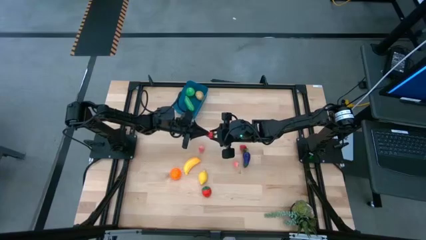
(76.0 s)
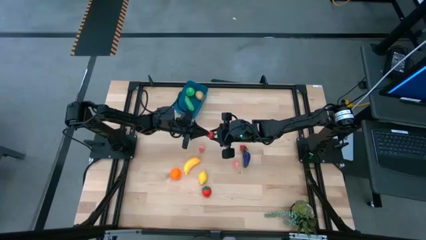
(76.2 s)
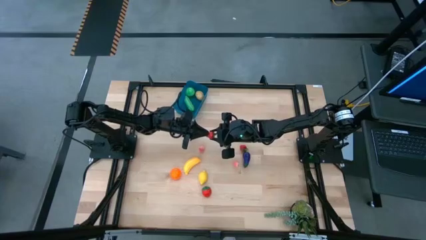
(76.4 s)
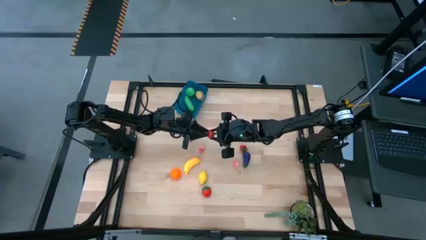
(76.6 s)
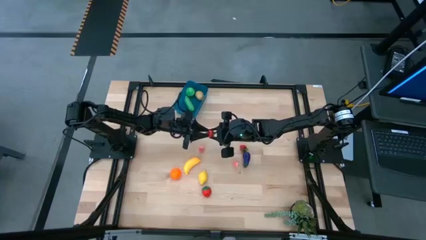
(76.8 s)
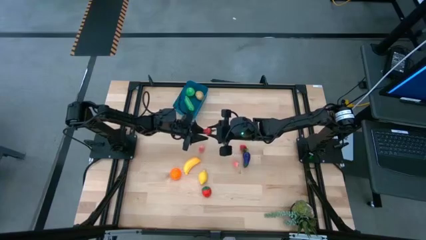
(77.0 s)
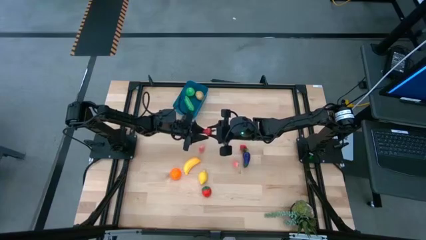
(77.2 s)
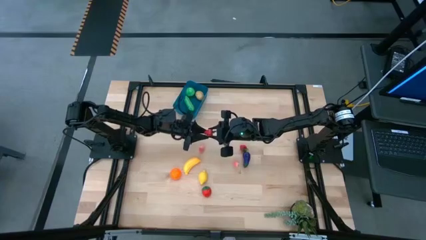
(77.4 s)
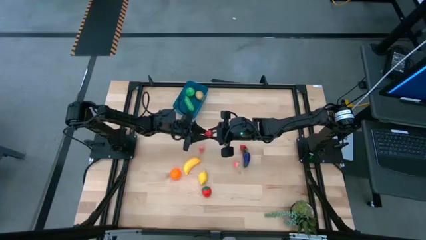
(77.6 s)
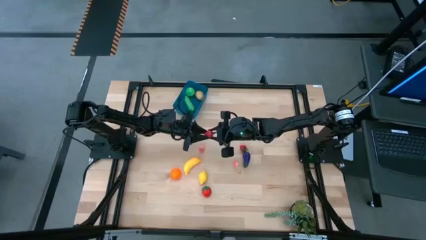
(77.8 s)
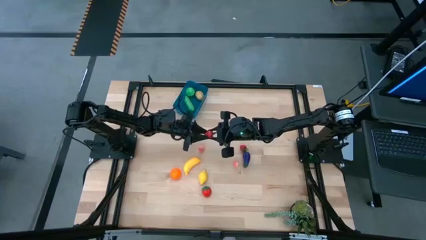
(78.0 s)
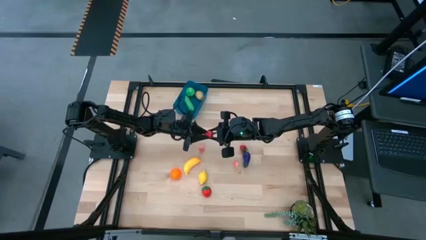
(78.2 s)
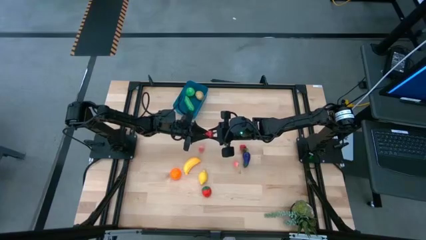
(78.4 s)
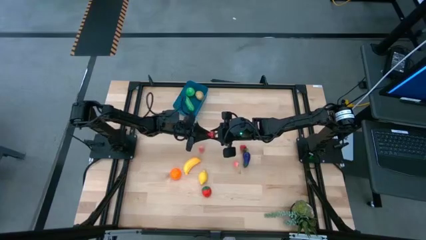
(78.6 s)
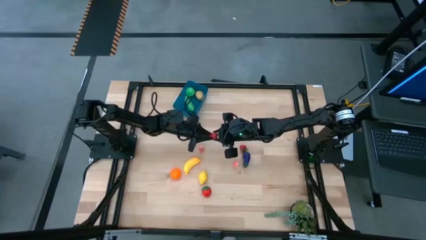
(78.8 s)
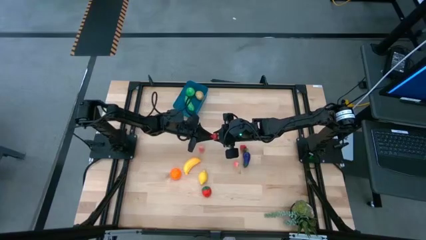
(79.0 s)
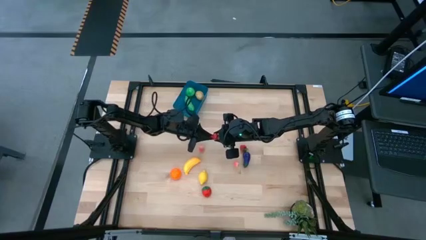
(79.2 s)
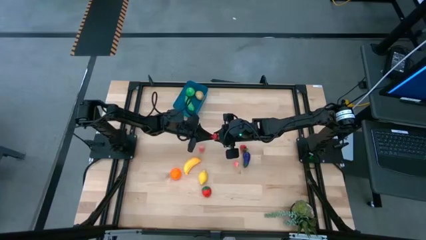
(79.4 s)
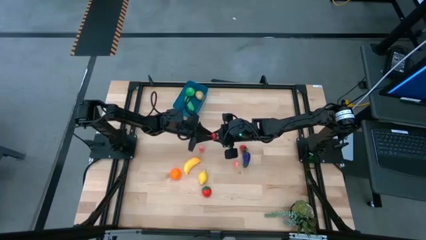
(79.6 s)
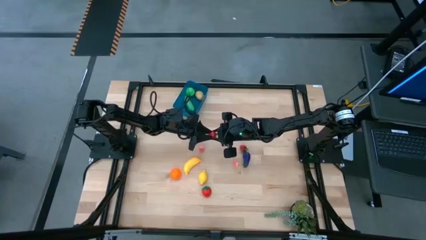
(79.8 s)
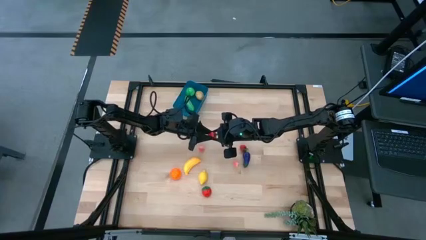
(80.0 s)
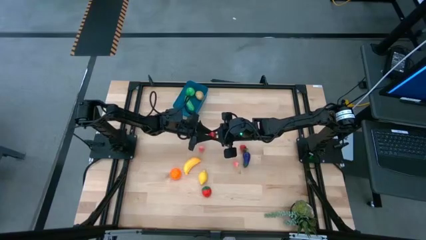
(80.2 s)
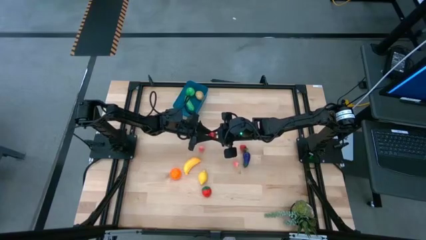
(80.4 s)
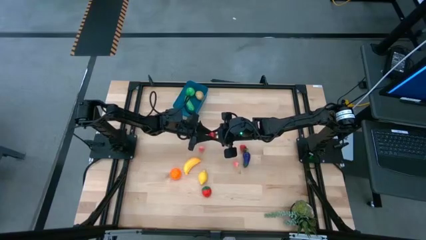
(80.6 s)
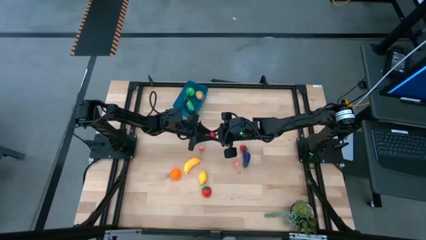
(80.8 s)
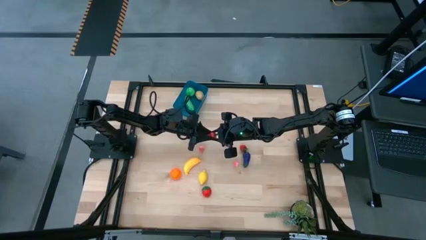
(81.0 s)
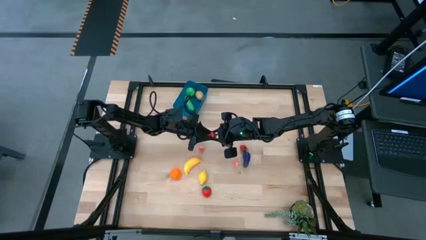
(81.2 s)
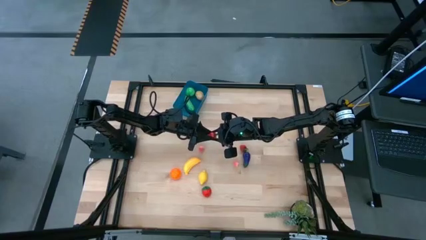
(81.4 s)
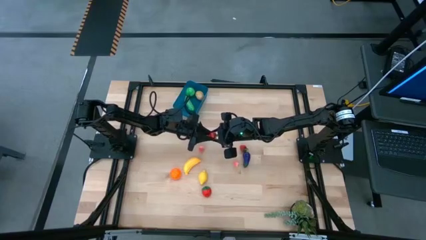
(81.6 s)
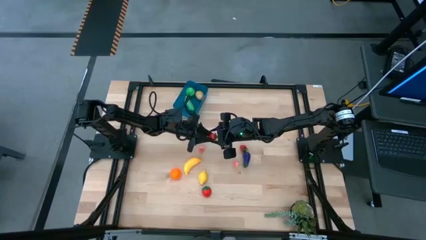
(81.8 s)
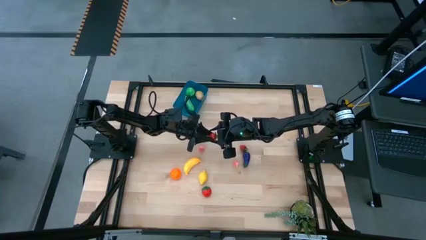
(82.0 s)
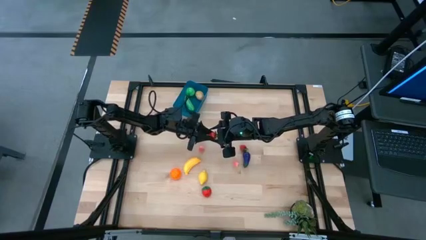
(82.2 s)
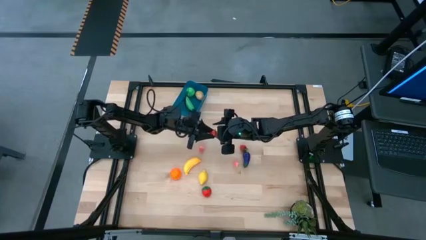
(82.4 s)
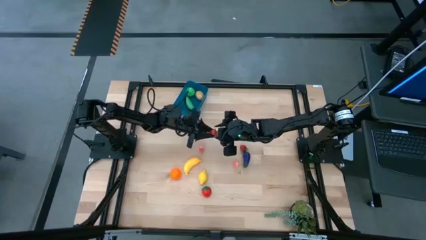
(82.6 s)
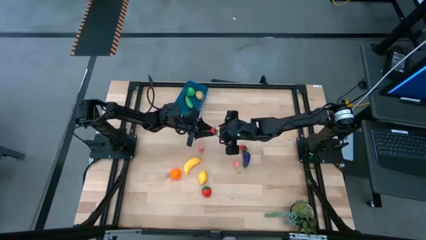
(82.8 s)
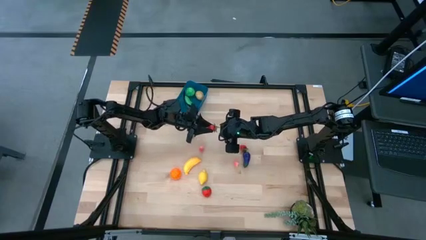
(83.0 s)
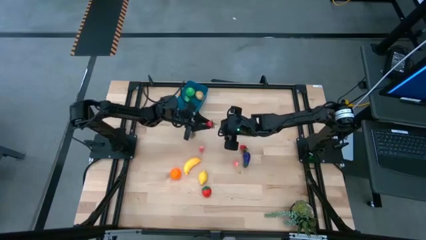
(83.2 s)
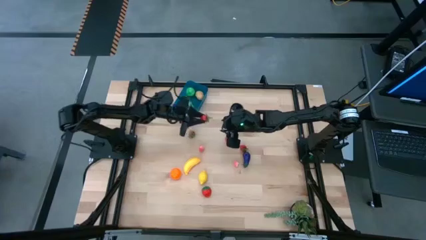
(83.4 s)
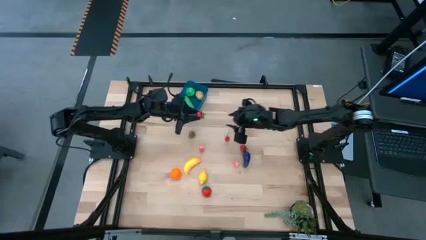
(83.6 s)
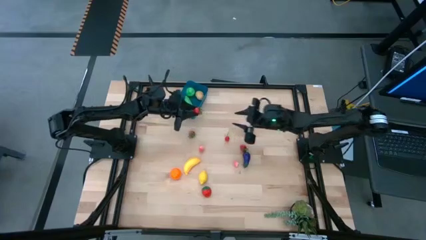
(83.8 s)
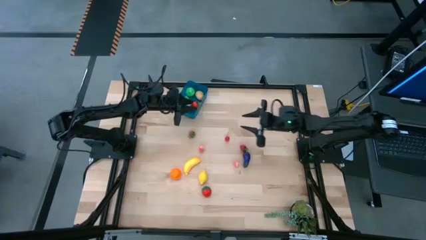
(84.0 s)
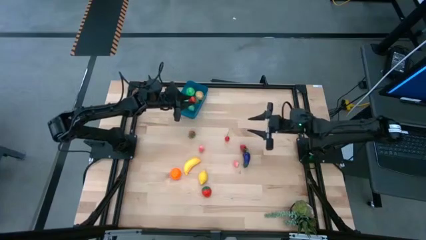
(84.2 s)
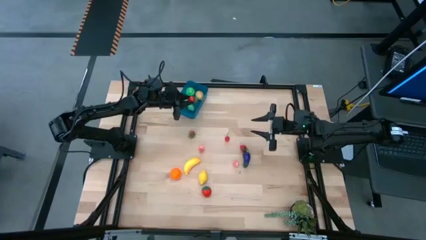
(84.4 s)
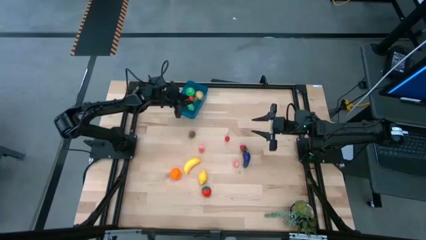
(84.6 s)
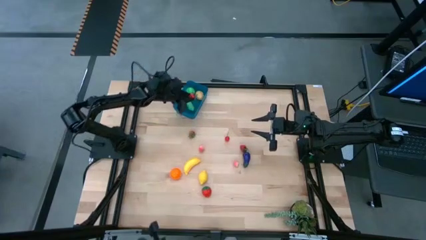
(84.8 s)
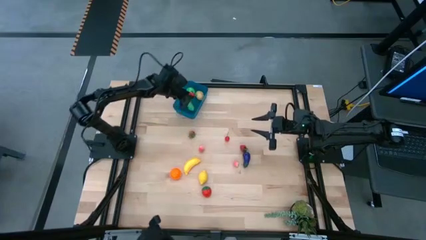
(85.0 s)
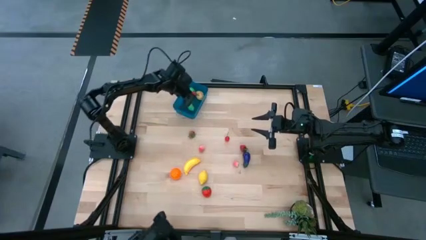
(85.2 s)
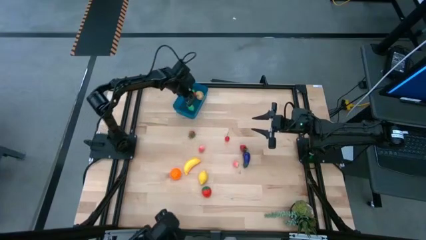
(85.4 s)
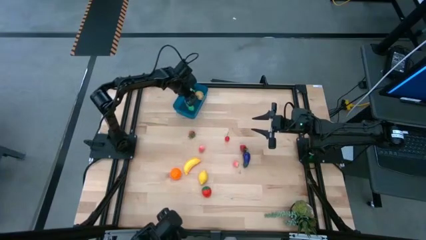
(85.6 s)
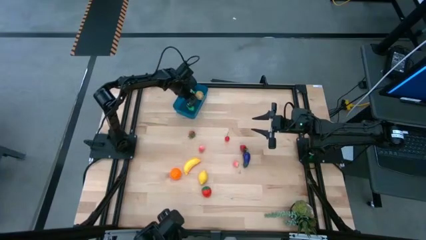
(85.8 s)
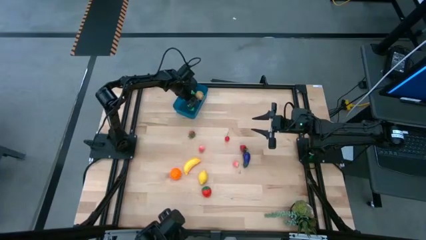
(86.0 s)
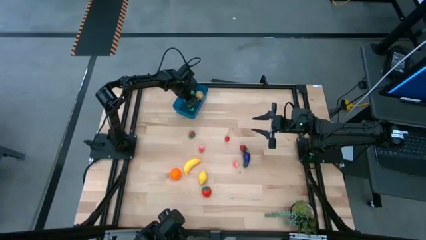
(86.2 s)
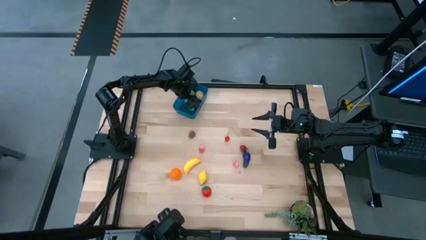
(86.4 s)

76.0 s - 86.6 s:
Task: Pick and placing Produce into tupperware
Put the top middle red strawberry into the blue bin
